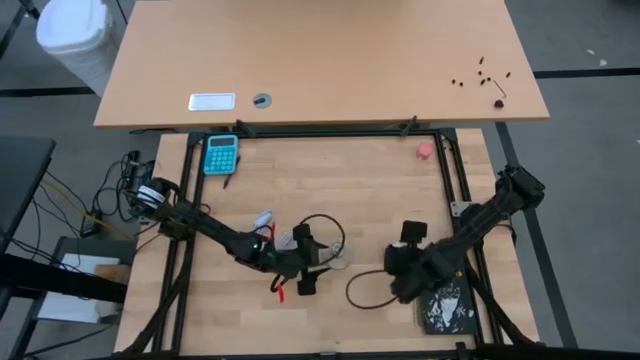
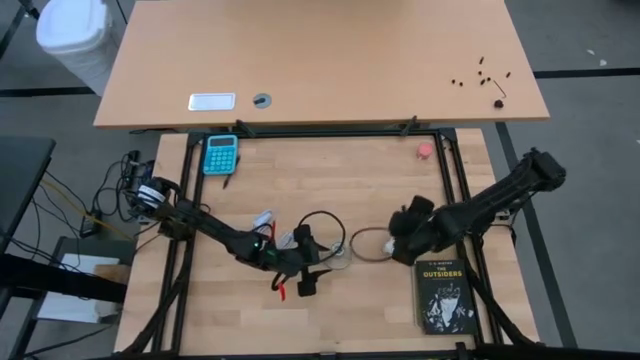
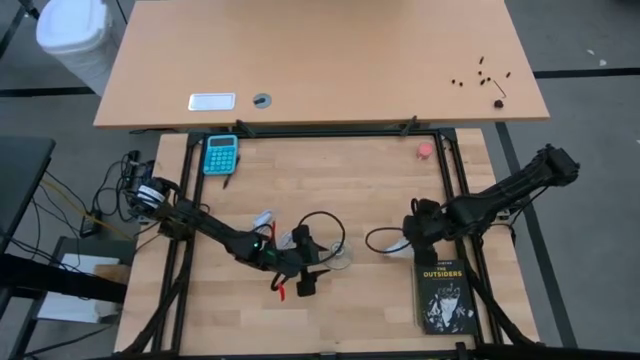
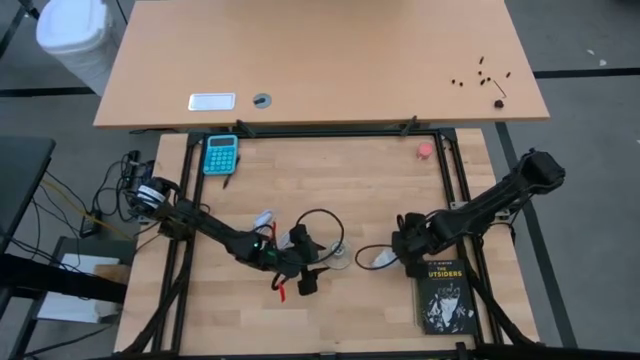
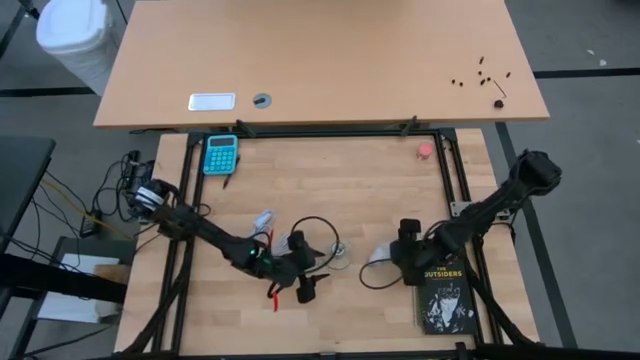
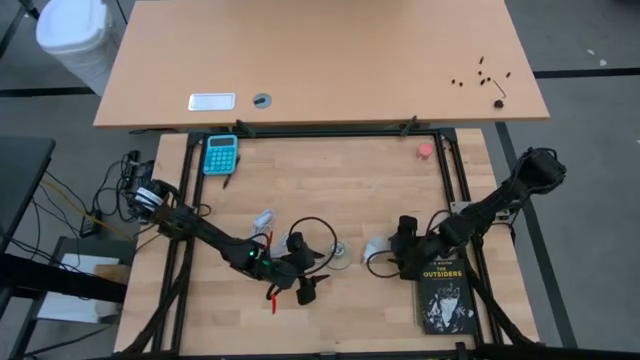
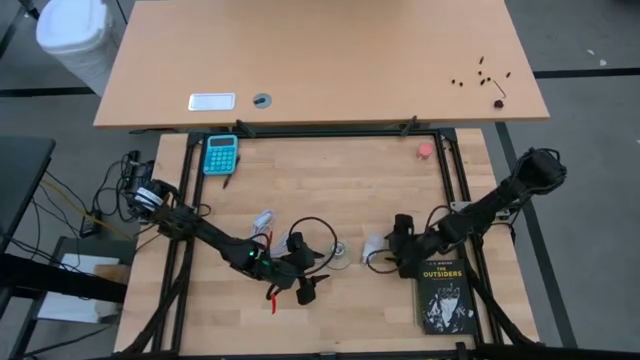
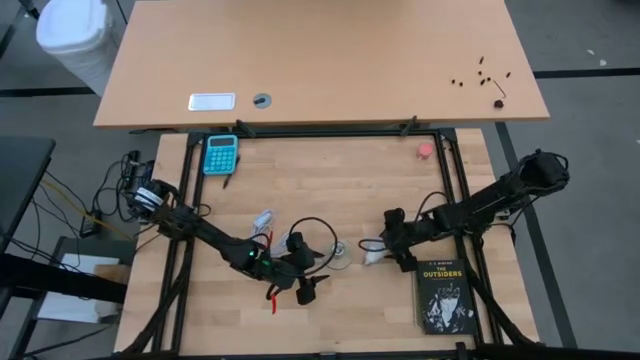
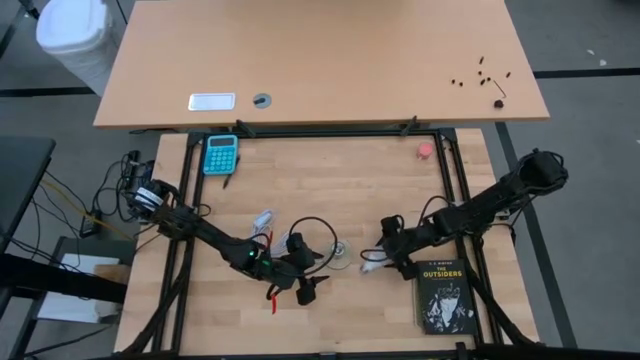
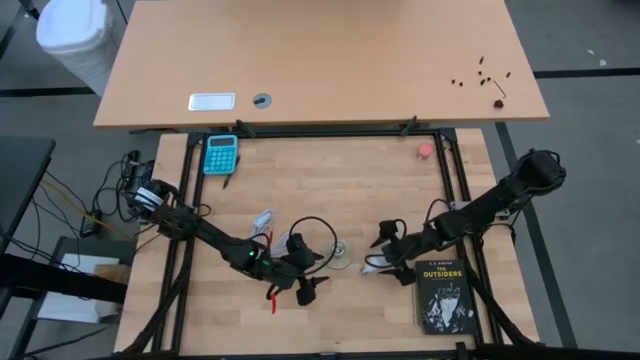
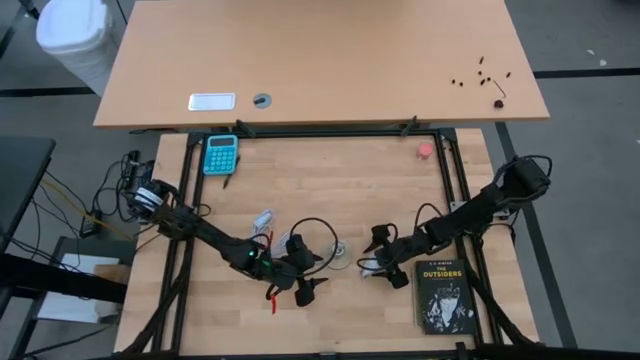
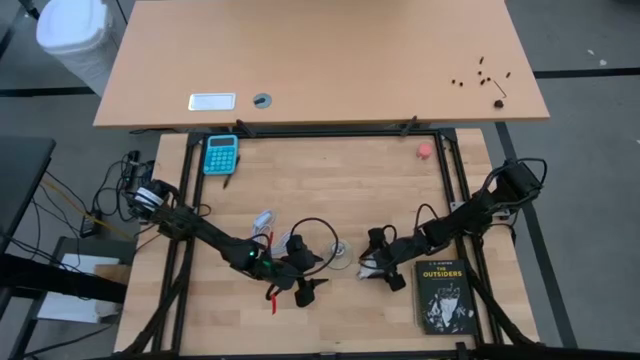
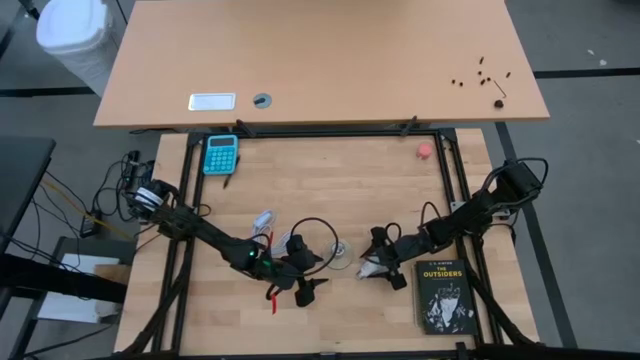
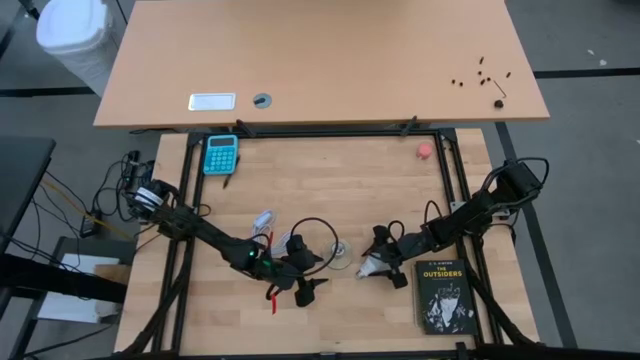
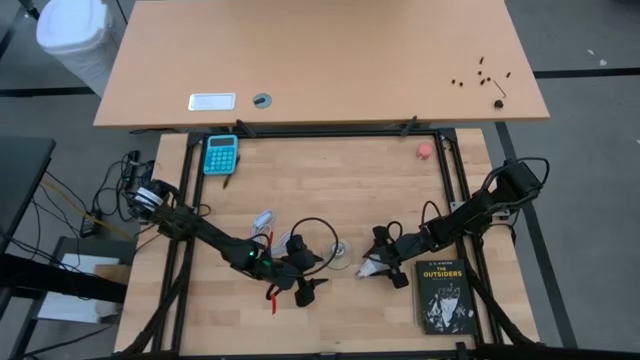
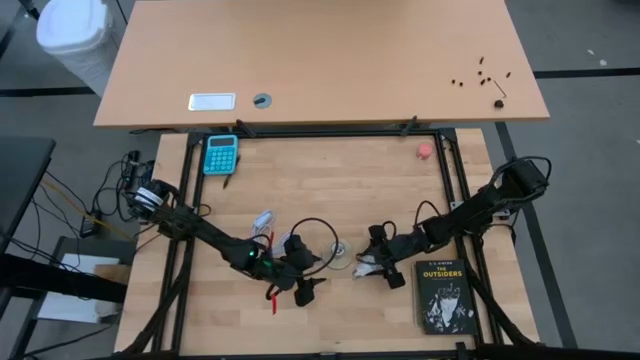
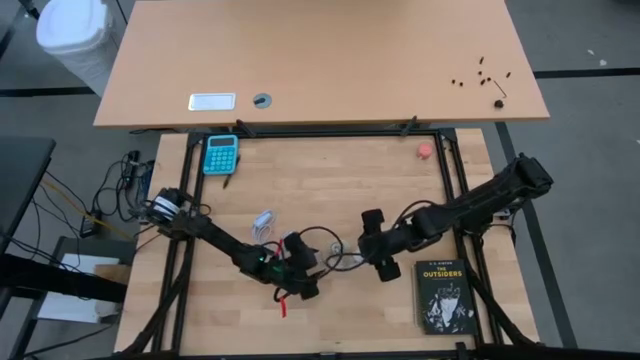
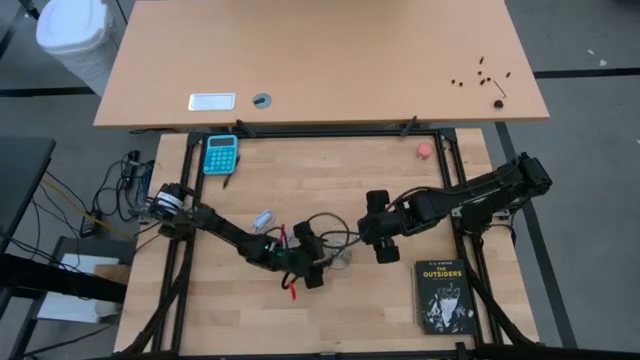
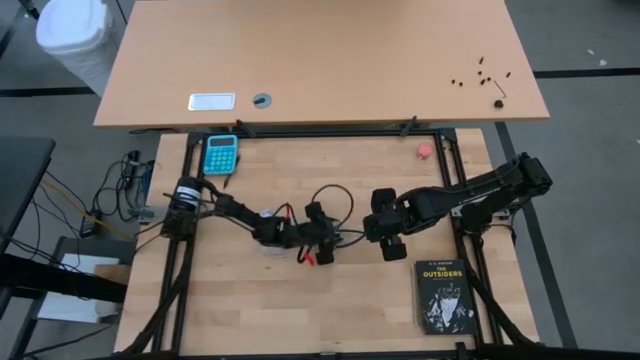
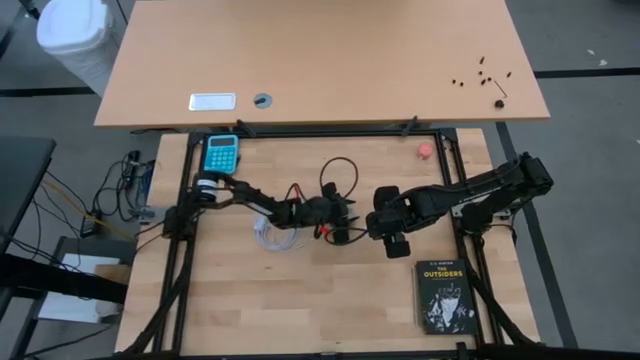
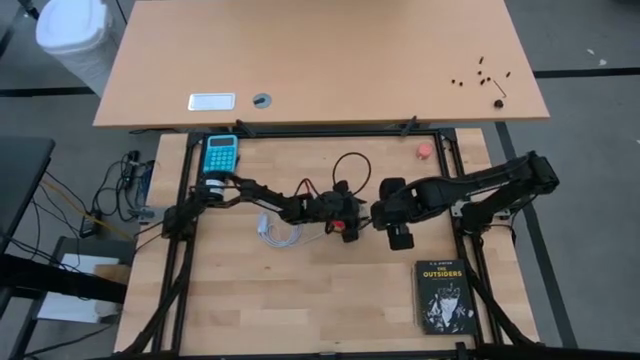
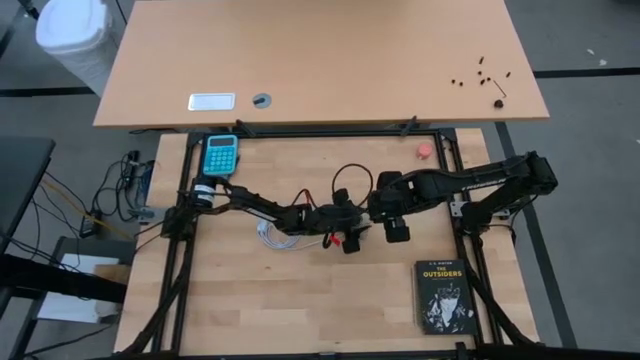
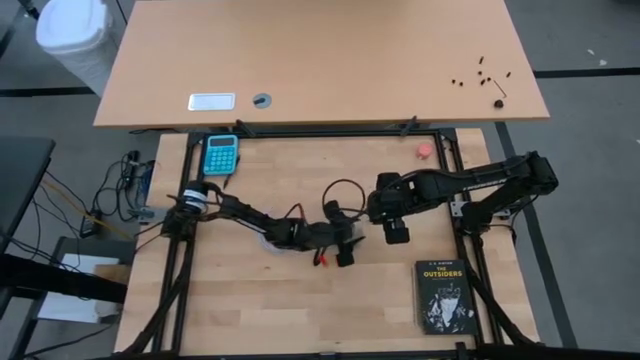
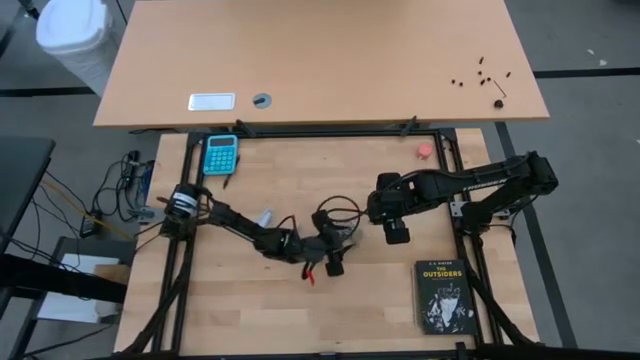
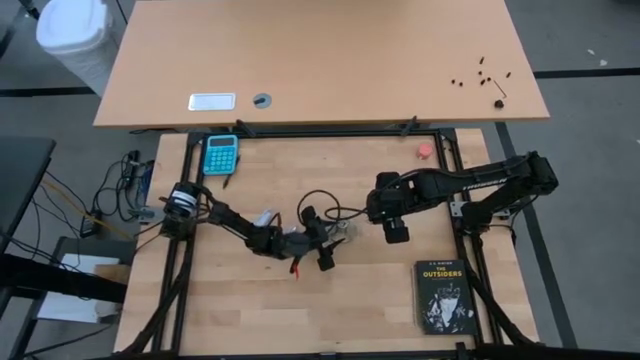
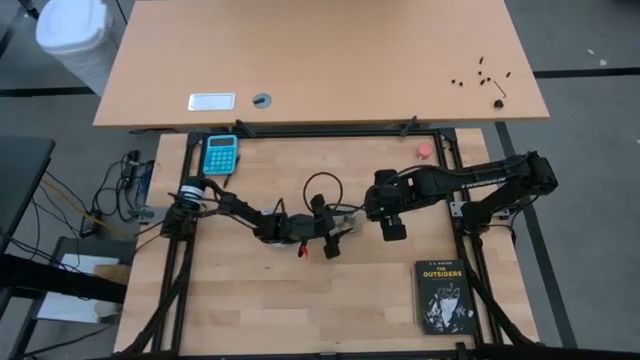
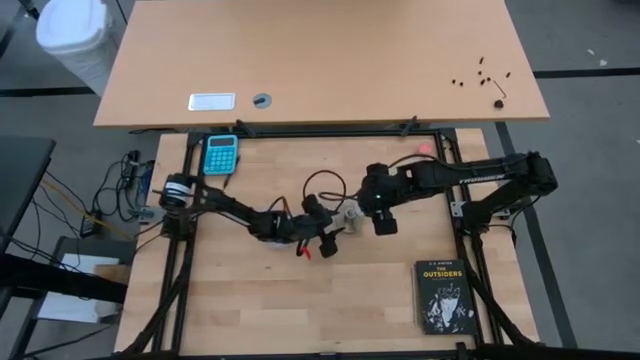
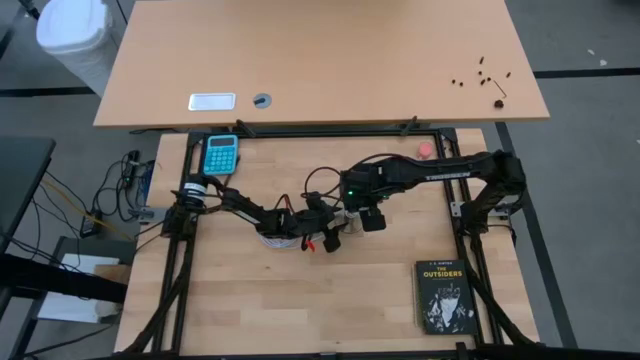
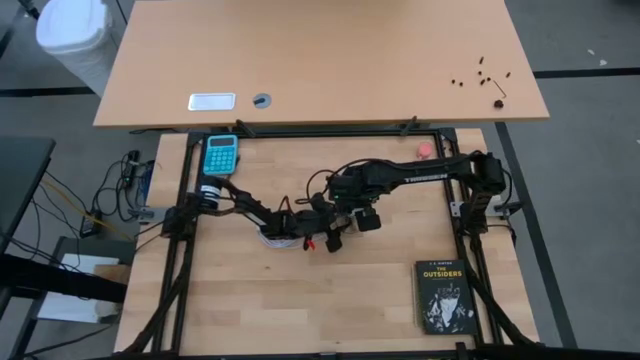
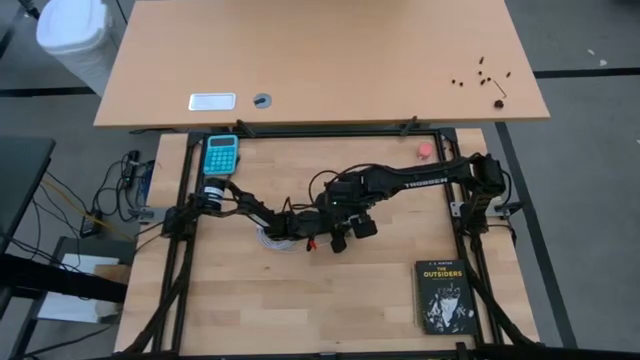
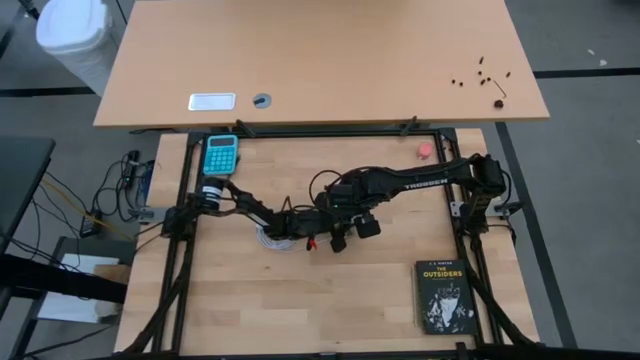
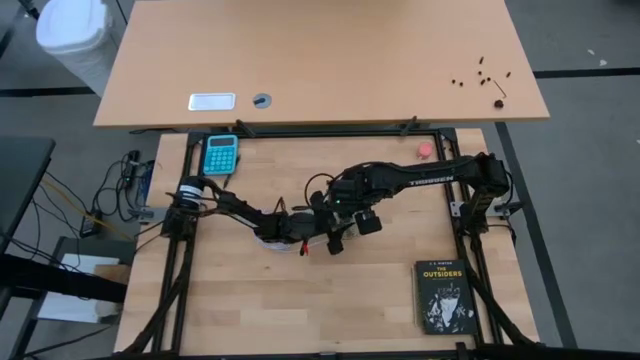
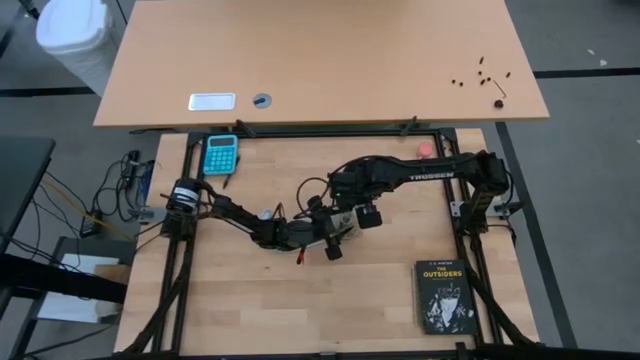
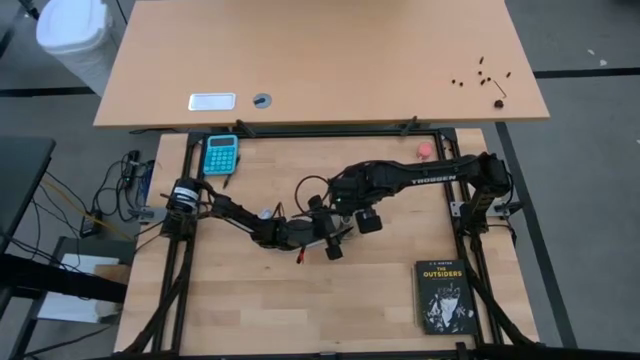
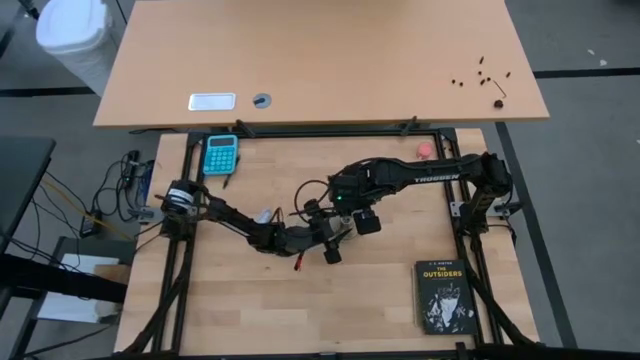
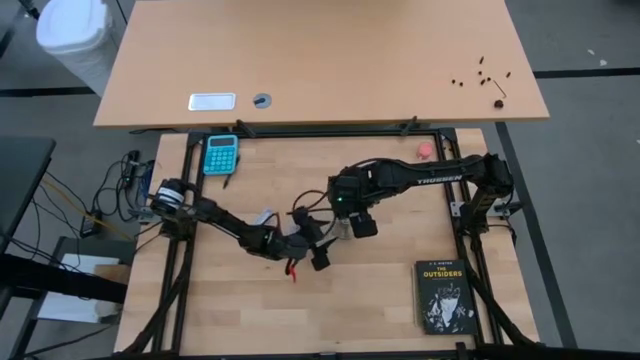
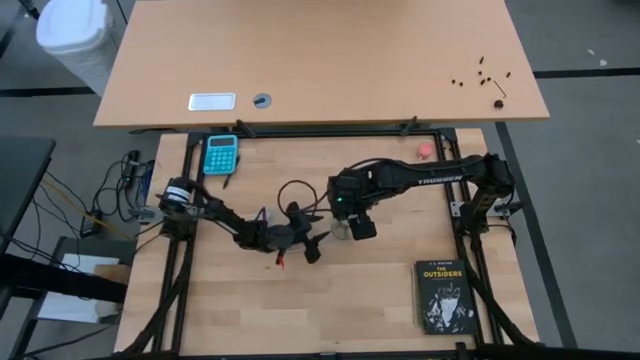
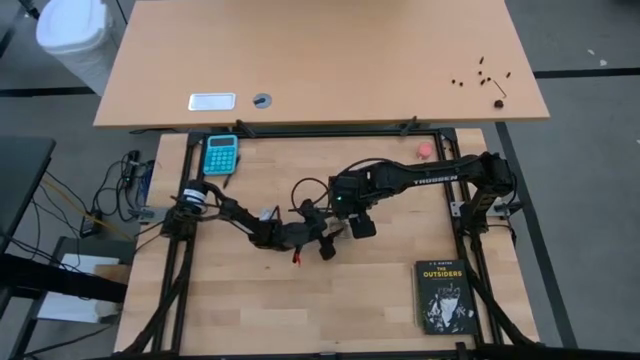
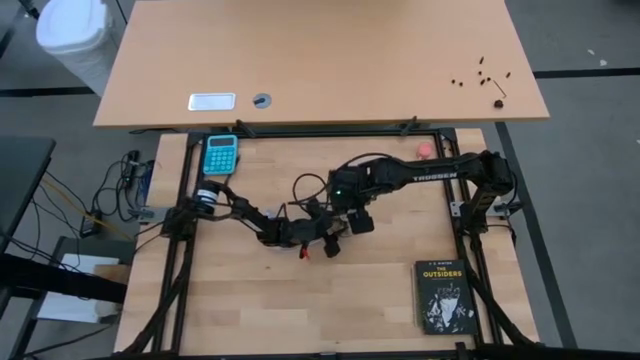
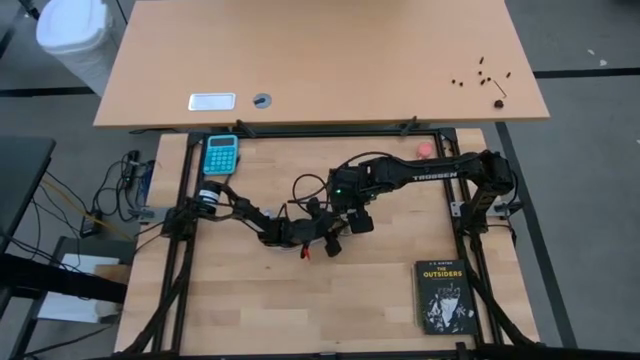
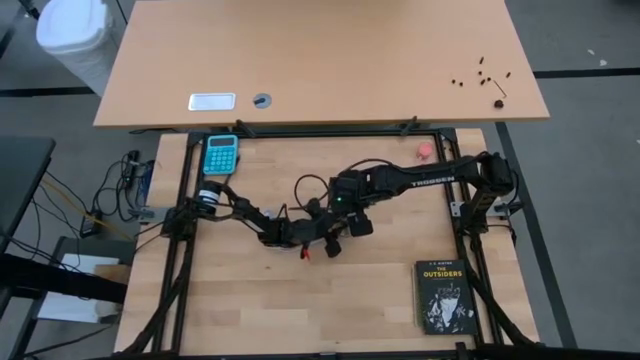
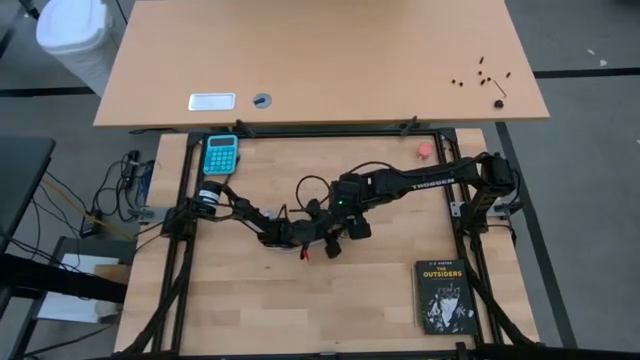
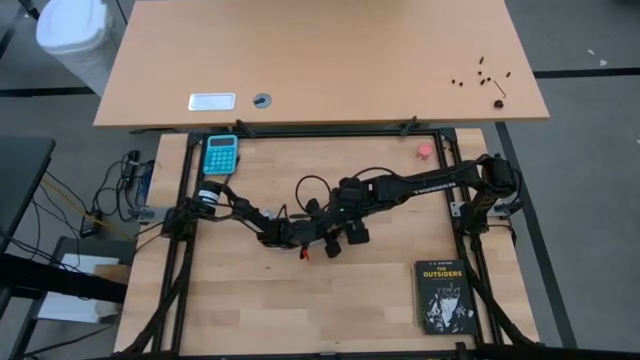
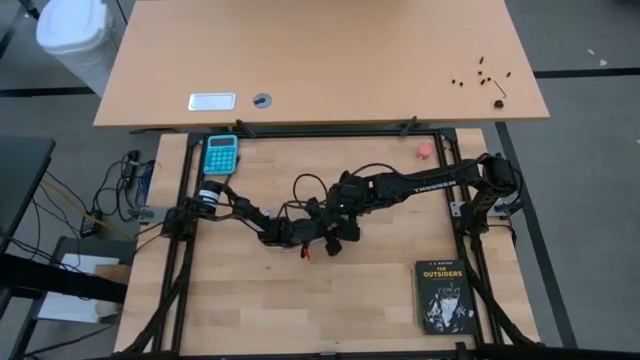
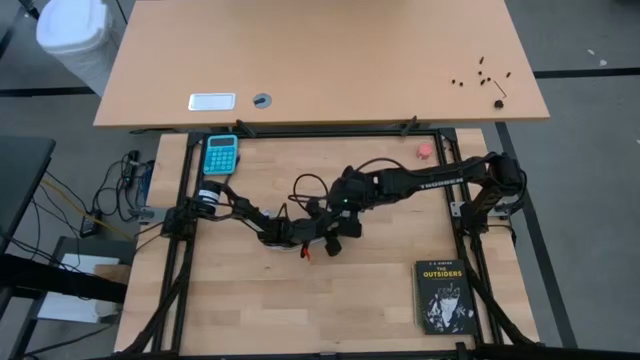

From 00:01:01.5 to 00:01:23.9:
Task: Screw lightbulb
Insert the lightbulb into the lamp
